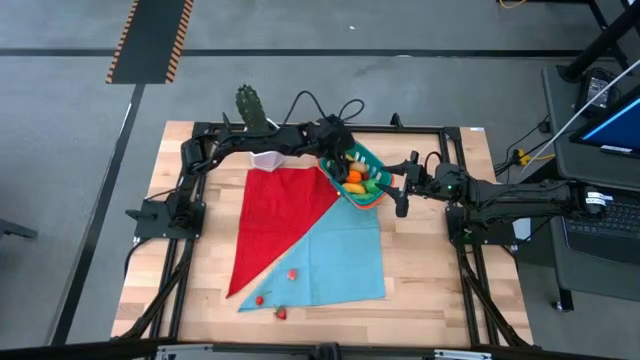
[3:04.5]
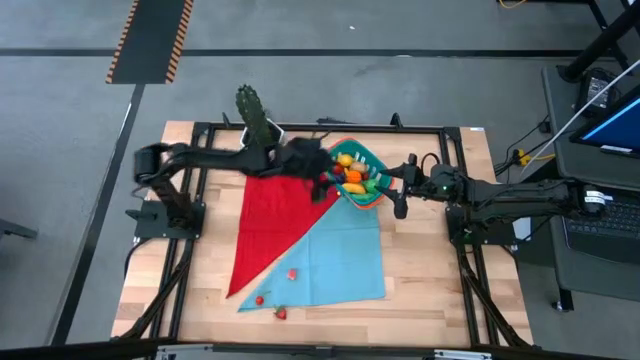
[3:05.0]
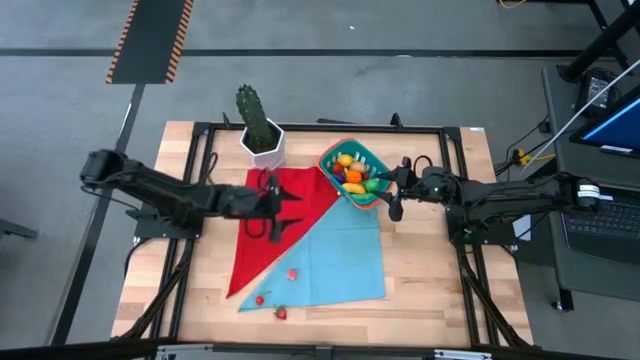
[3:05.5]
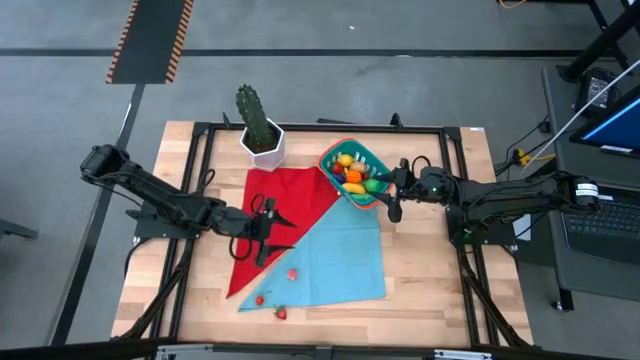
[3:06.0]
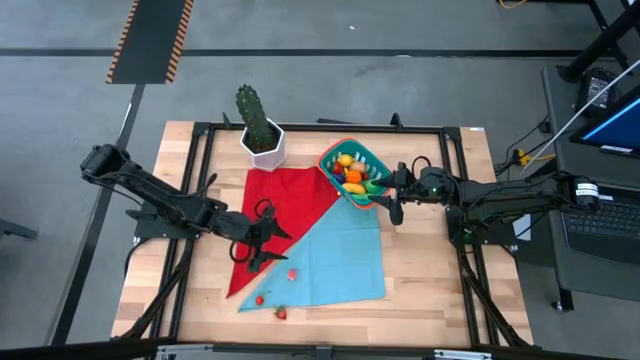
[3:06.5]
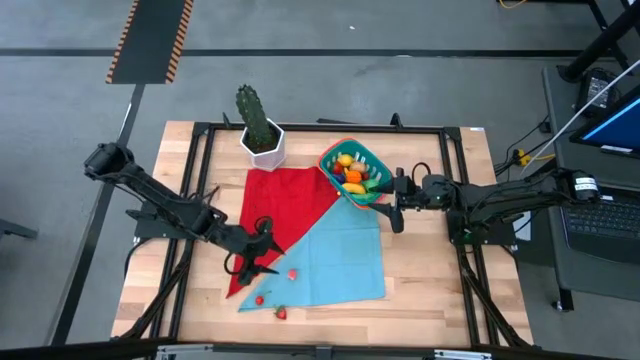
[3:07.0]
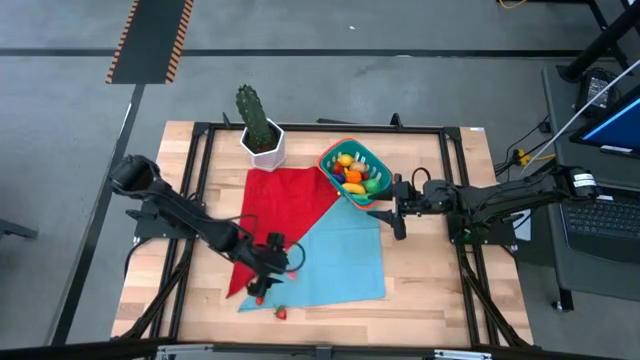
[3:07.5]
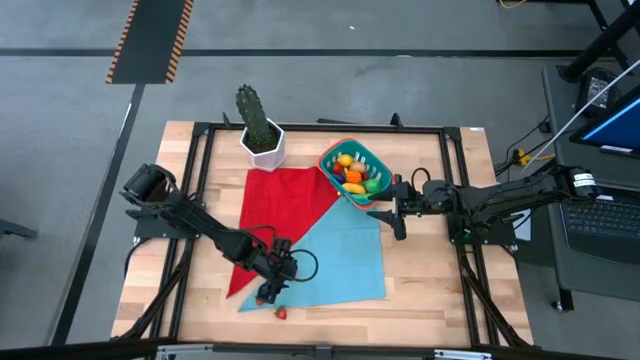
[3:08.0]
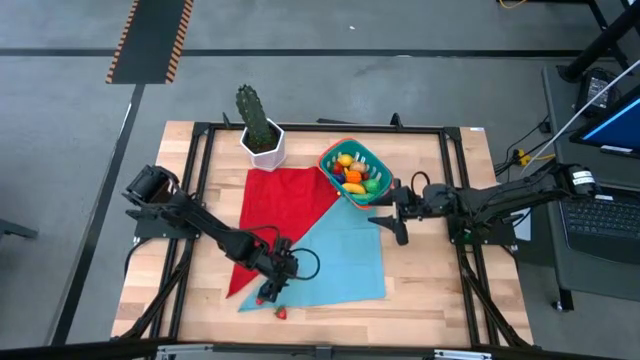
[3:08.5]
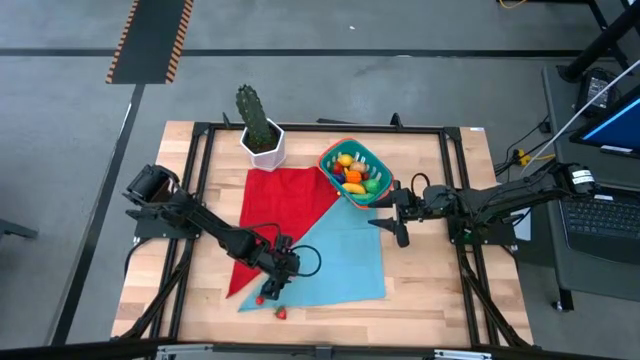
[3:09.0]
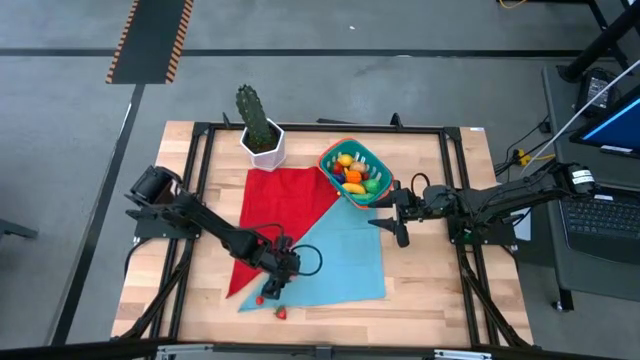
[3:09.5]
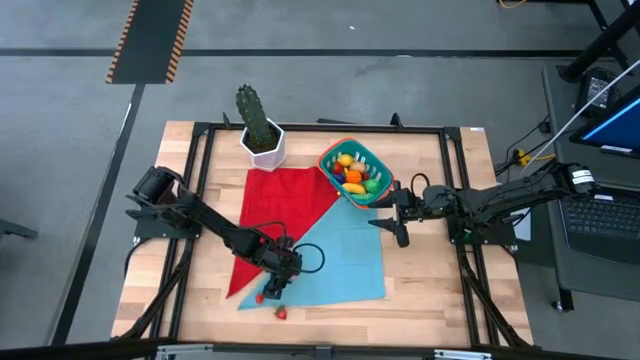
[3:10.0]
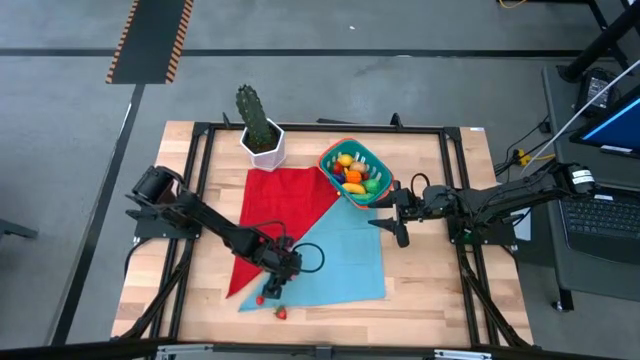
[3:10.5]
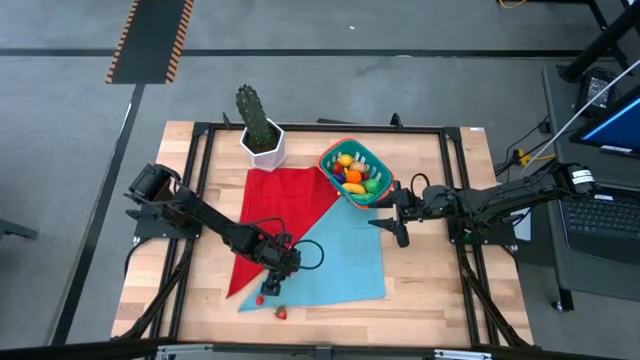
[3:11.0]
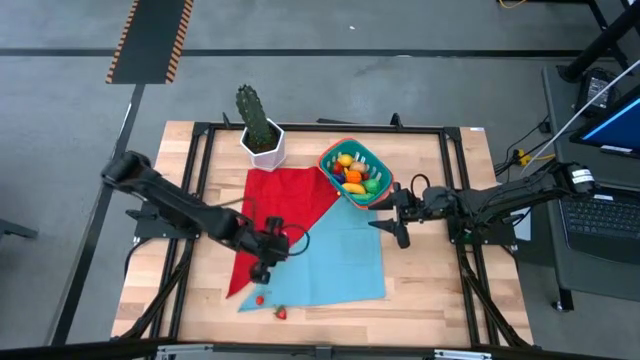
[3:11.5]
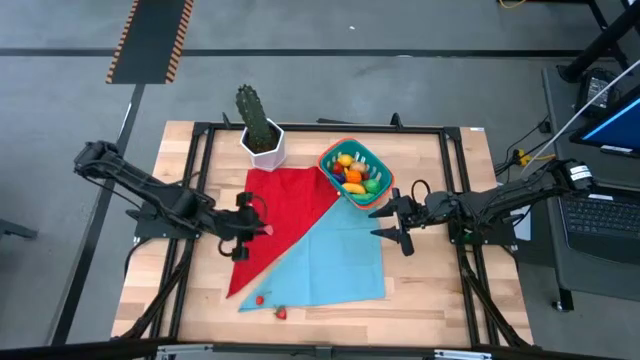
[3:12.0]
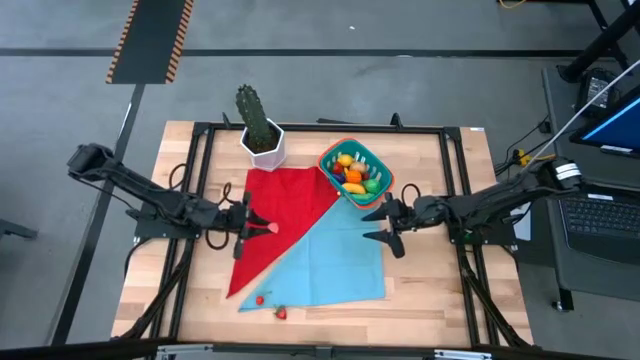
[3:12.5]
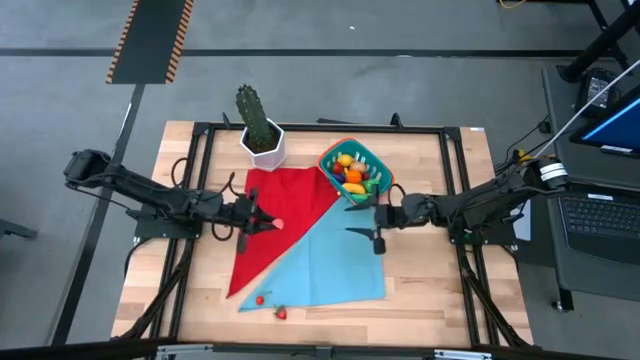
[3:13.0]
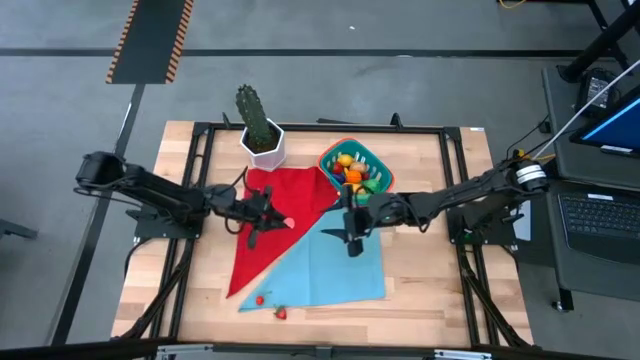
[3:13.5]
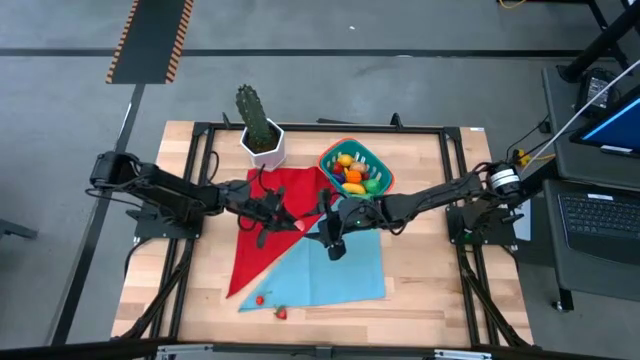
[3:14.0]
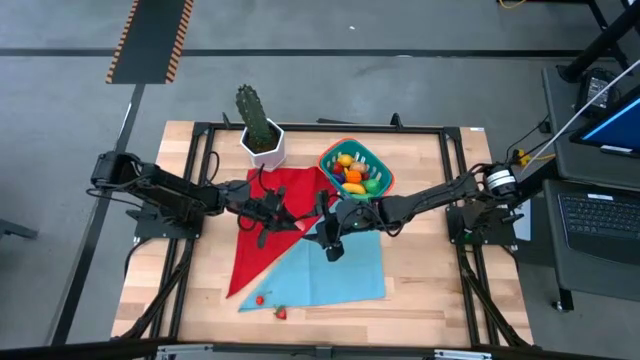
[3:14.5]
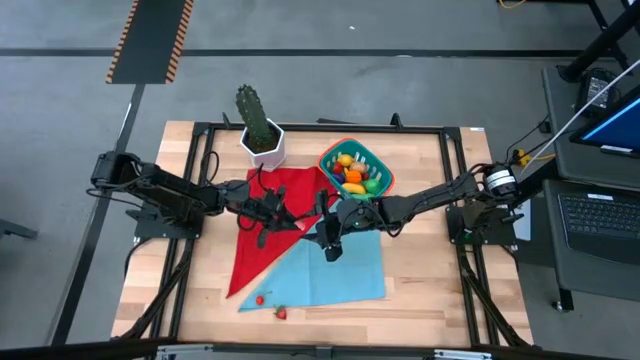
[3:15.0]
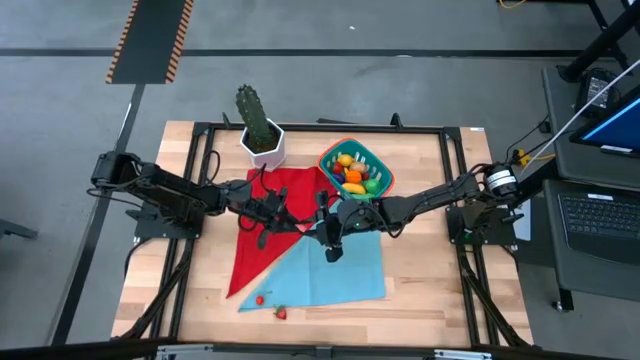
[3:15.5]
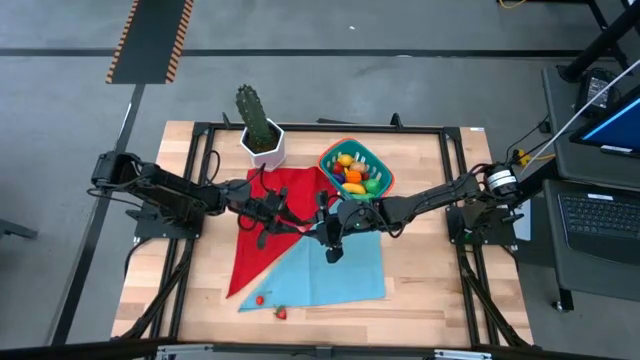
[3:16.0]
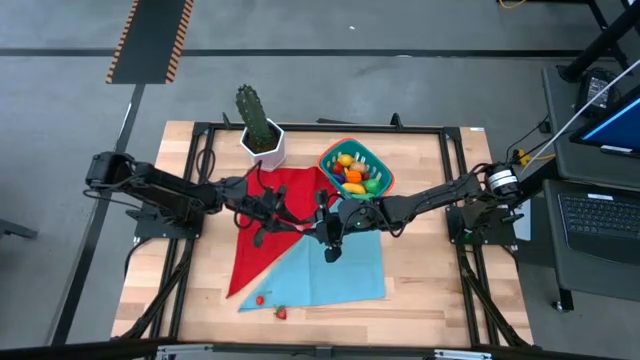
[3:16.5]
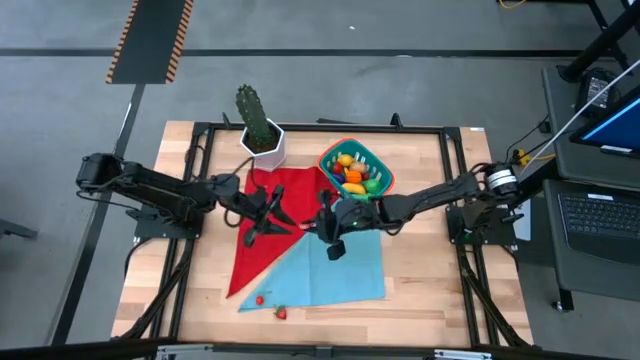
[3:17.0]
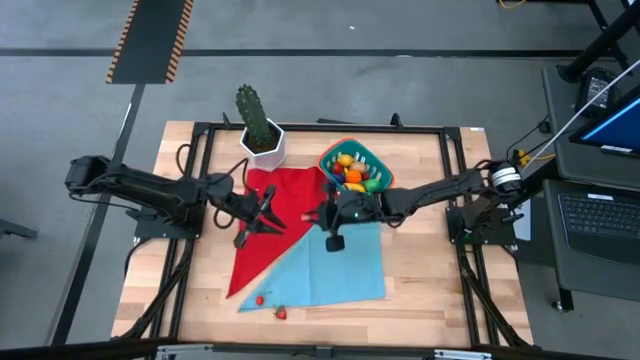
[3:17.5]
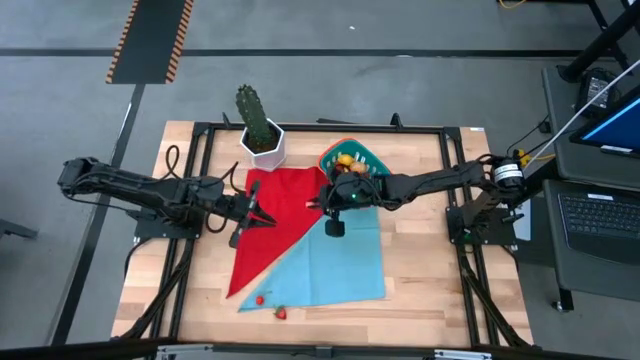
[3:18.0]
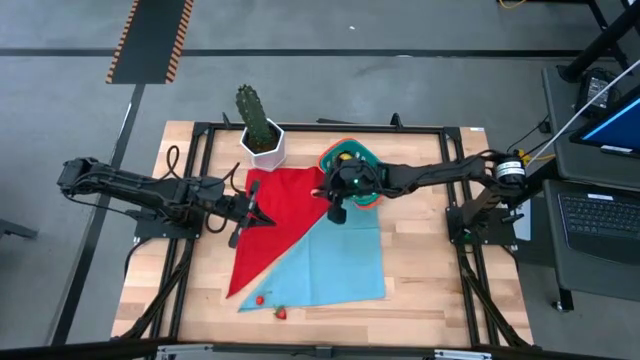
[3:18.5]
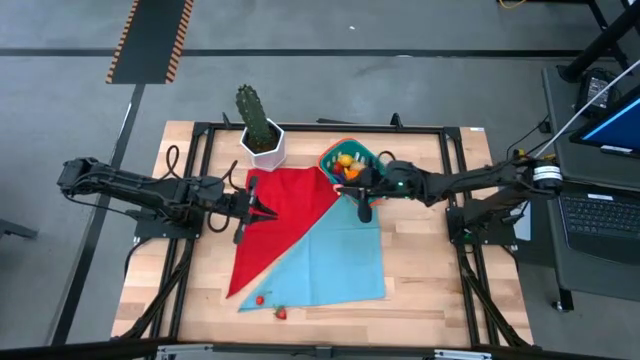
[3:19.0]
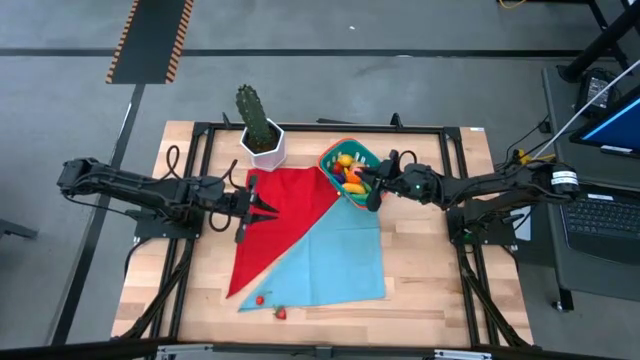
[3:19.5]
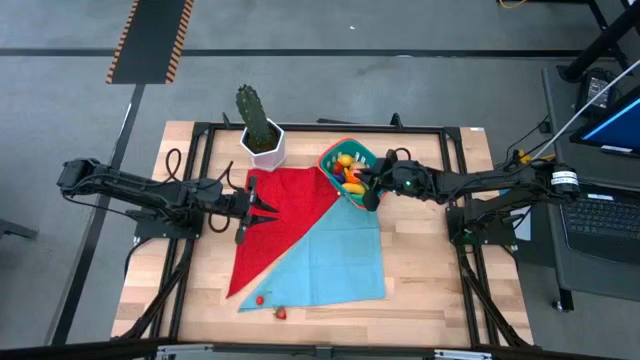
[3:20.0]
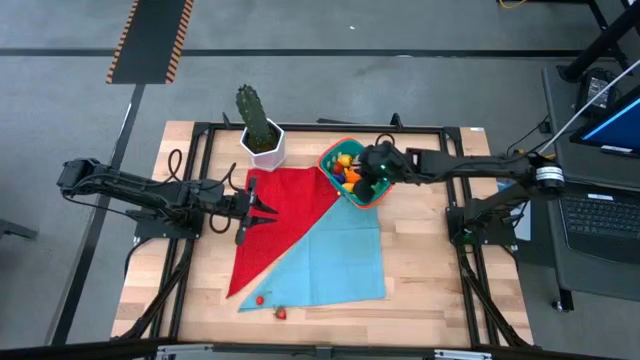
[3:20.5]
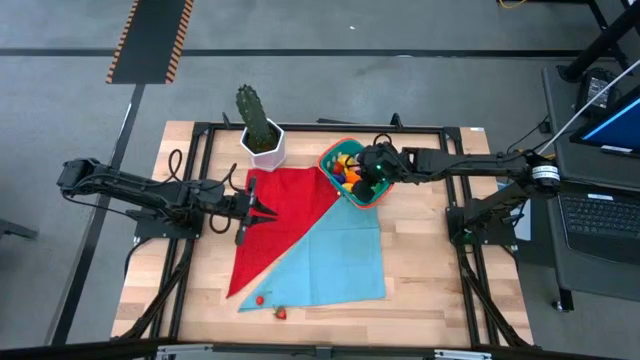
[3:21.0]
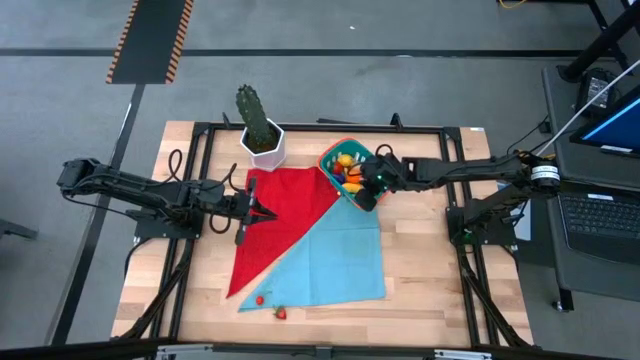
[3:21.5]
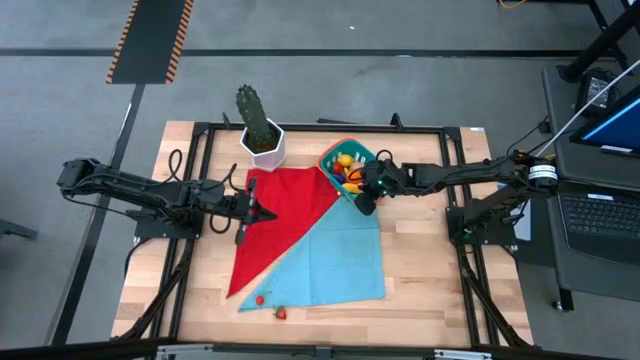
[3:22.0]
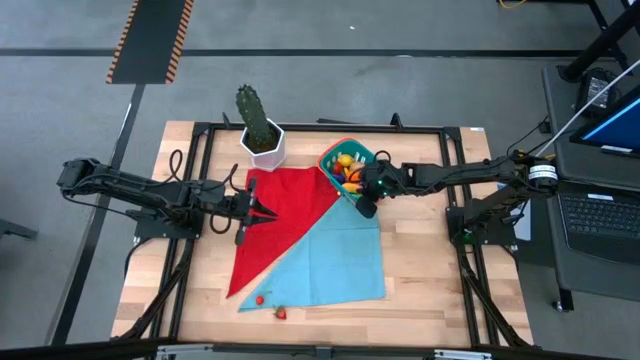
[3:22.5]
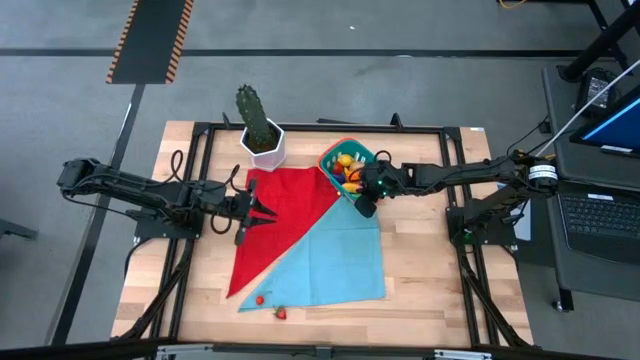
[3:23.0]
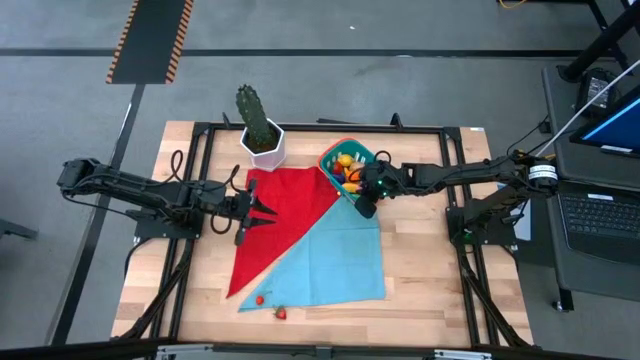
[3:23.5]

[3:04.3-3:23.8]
Task: Build produce basket
Put the pink peach into the blue basket

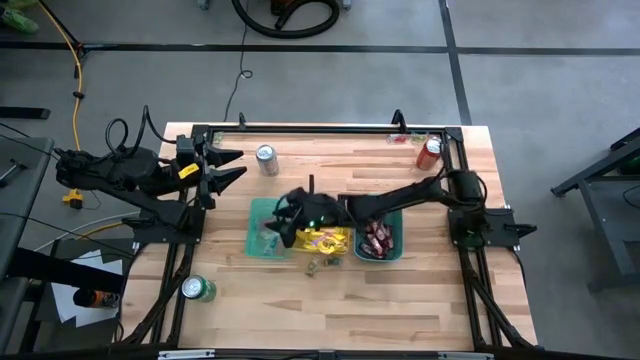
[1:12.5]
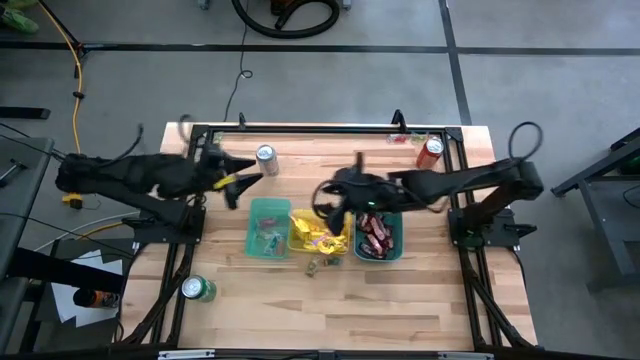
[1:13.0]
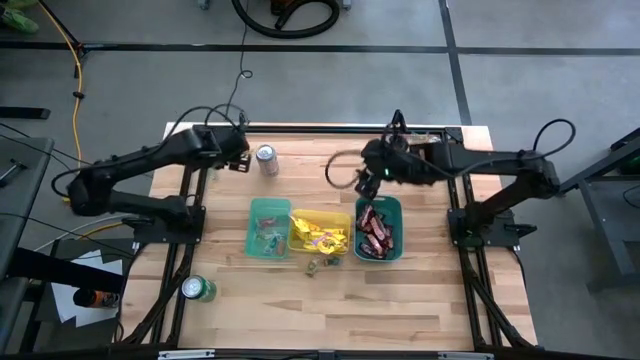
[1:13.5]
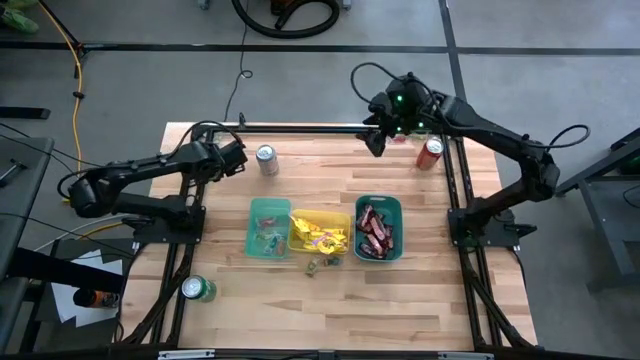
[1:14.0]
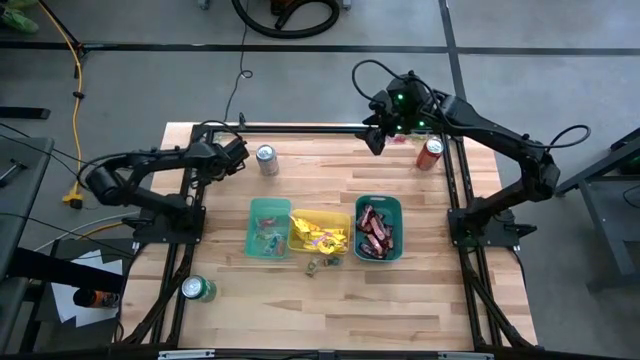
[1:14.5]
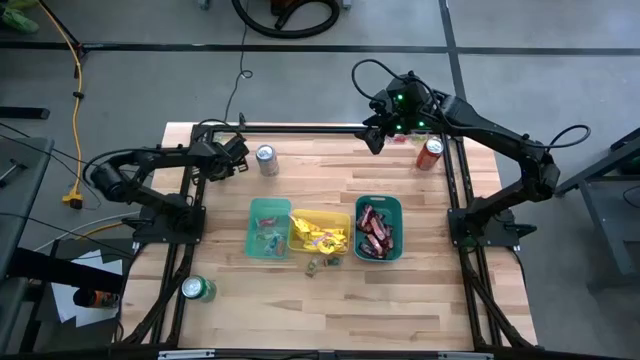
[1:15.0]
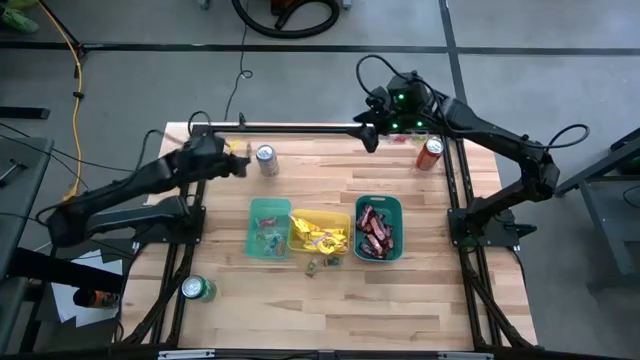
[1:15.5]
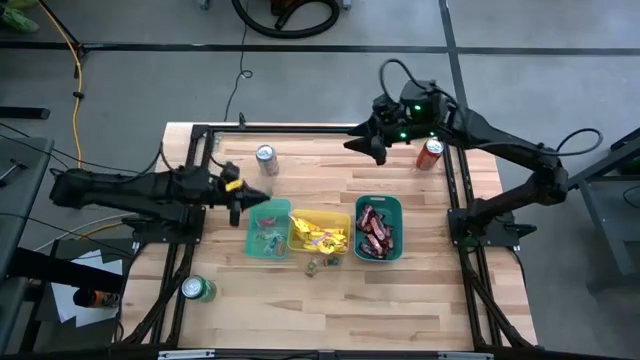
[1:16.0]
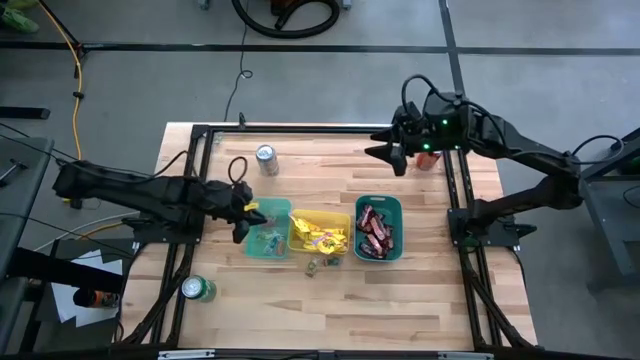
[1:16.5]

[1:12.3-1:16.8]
Task: Sort candy
Put the green gummy into the green bin
